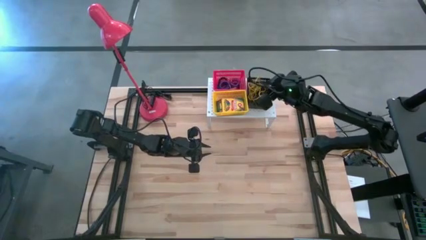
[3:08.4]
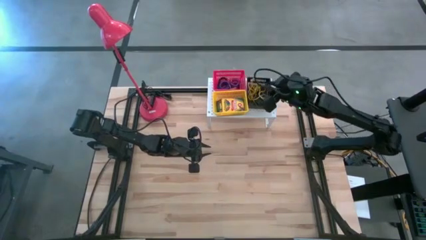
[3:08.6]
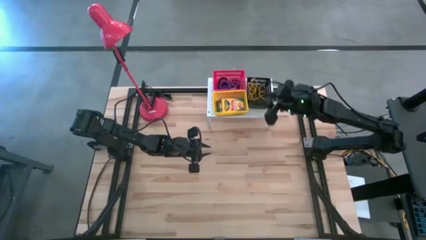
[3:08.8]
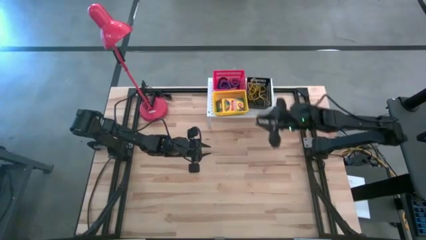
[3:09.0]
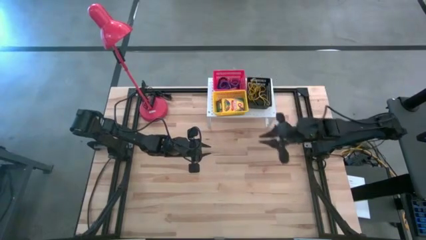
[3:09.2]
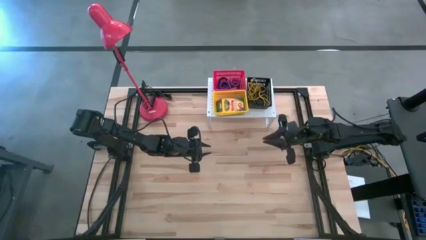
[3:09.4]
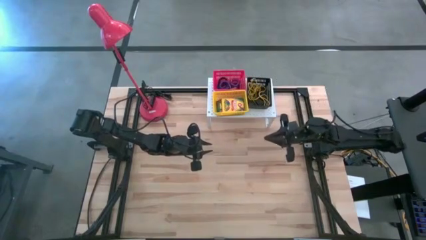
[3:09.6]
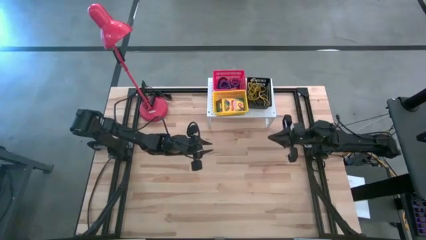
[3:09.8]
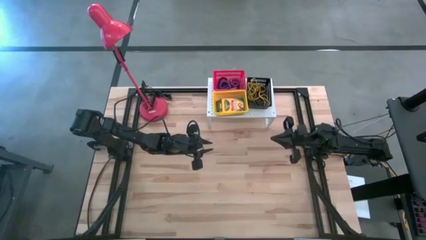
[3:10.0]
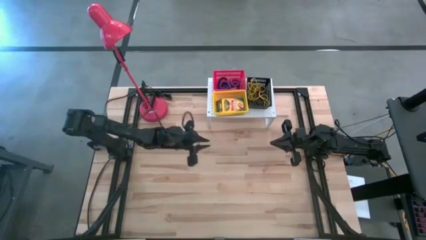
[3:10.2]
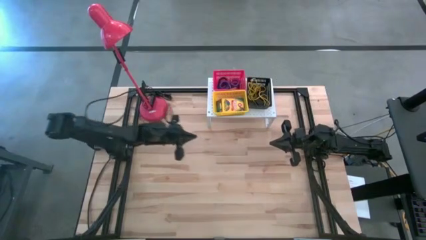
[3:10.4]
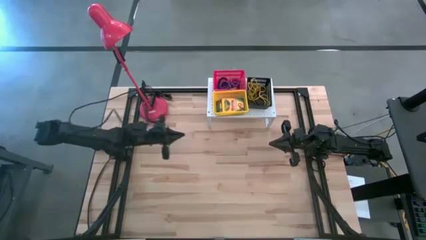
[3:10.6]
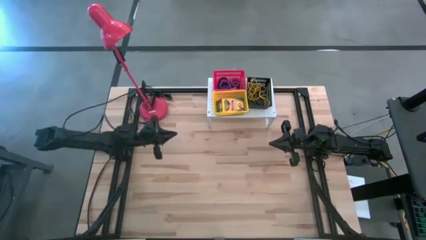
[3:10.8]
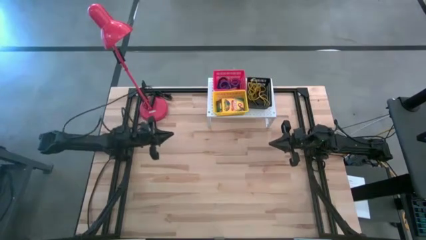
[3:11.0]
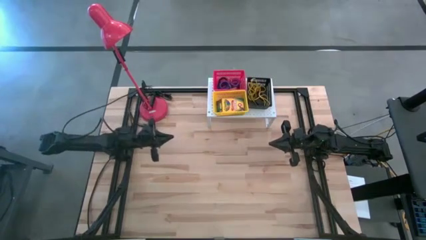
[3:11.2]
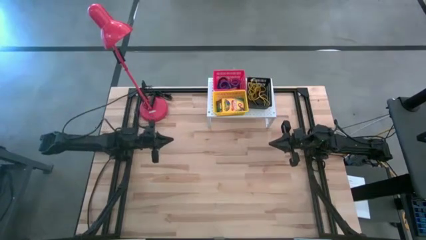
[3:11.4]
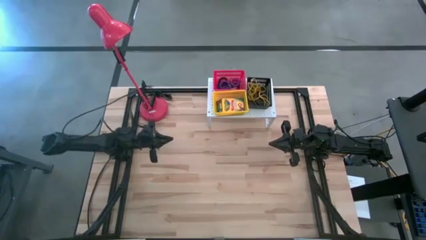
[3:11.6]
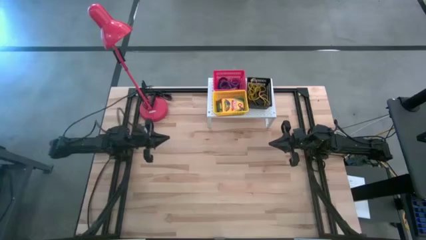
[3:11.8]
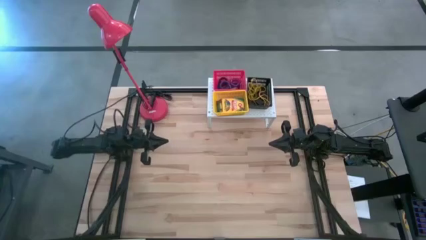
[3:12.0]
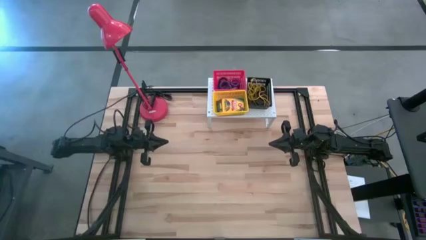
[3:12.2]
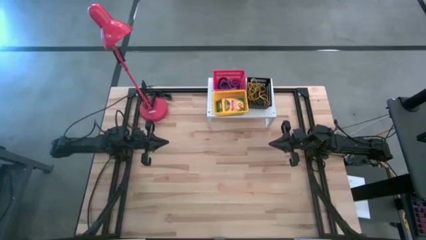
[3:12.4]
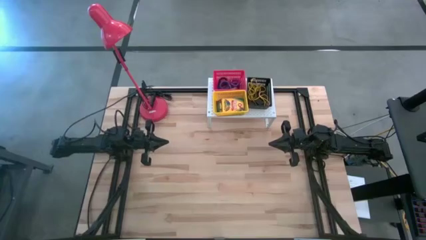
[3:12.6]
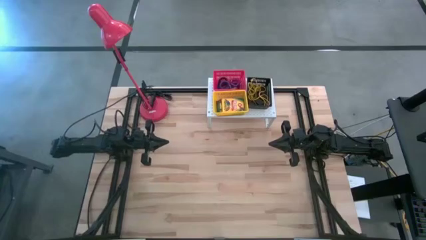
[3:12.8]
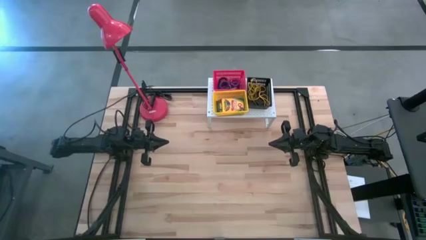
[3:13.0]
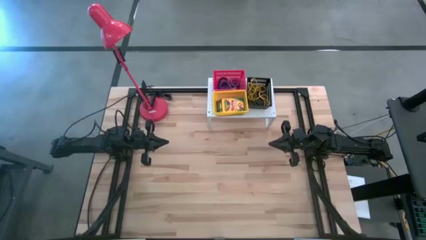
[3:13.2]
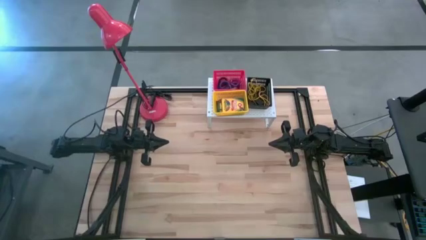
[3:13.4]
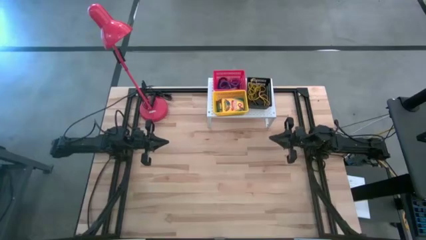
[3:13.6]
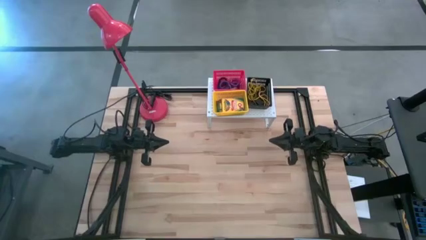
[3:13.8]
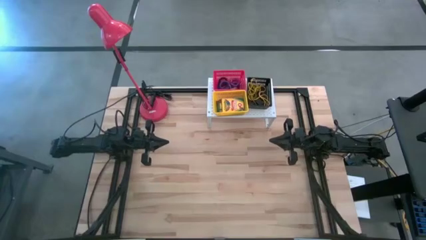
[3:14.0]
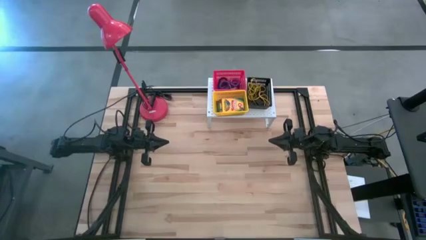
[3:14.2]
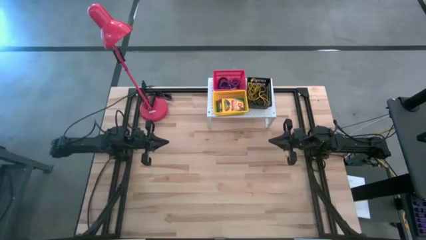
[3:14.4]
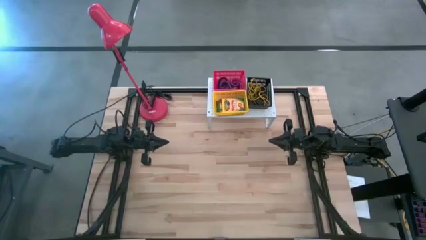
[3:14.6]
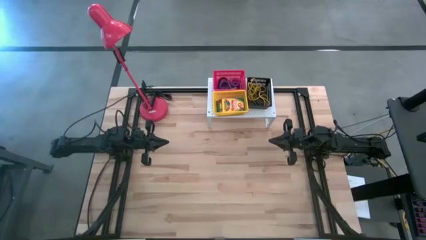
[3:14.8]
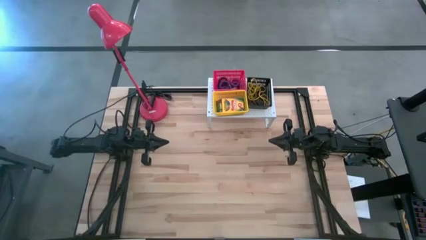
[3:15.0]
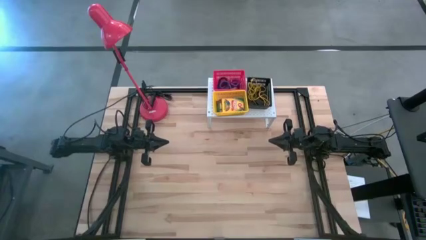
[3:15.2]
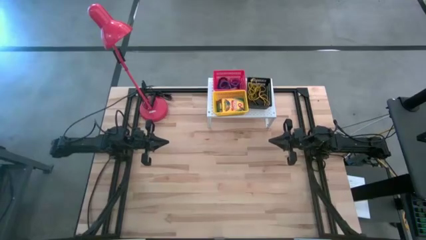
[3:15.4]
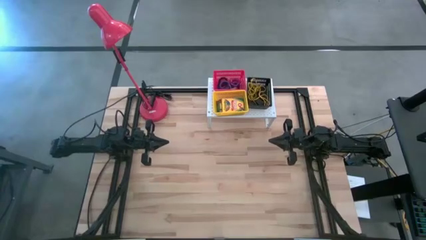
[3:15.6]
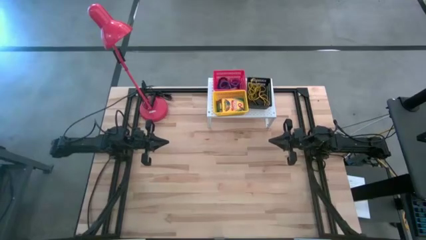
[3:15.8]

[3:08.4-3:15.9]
Task: Pick & Place Office Desk Supplies
Return to Home Position

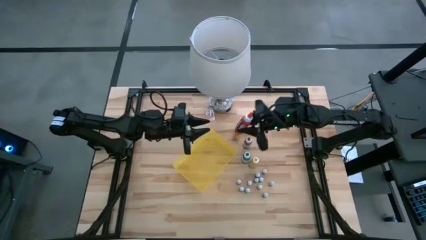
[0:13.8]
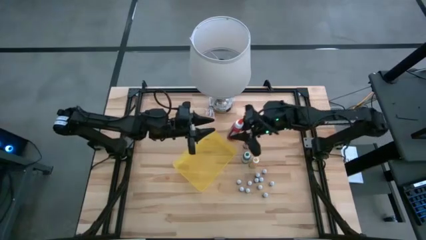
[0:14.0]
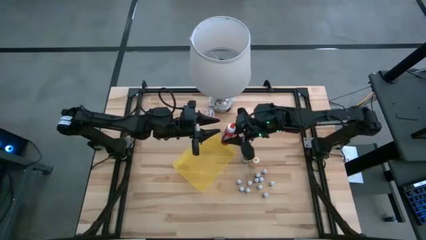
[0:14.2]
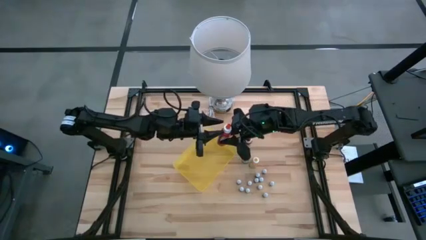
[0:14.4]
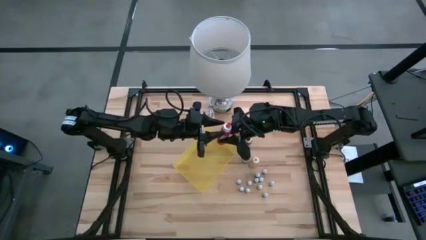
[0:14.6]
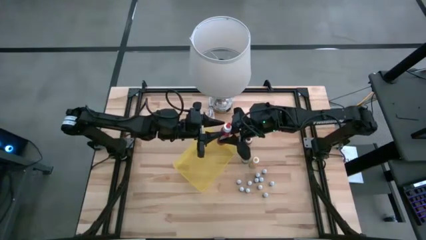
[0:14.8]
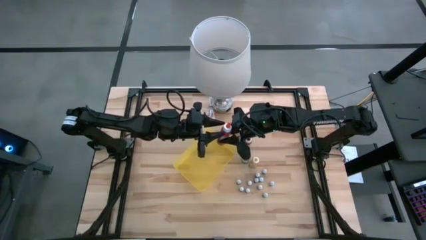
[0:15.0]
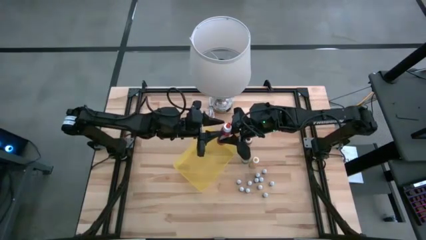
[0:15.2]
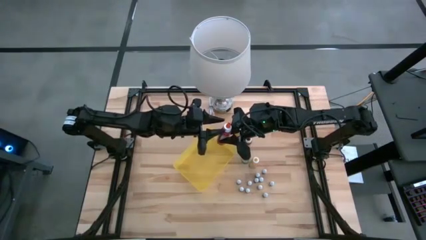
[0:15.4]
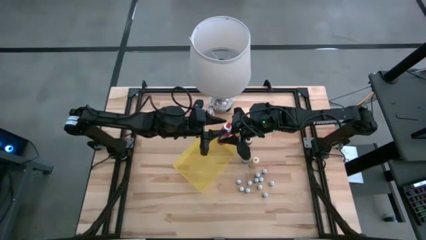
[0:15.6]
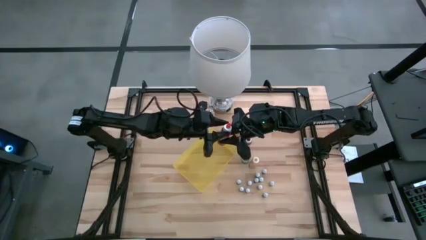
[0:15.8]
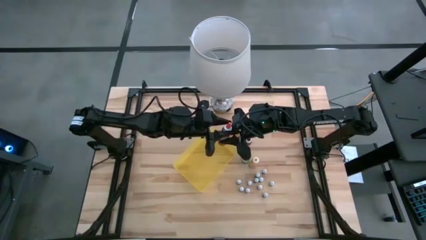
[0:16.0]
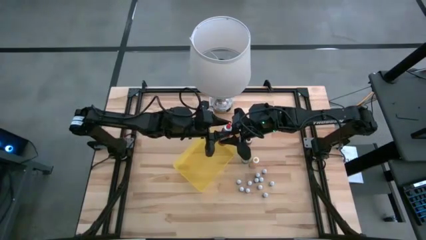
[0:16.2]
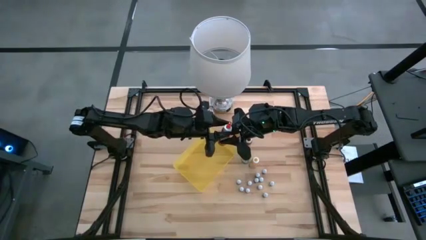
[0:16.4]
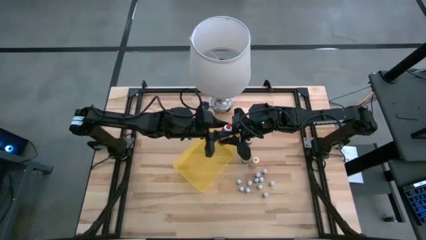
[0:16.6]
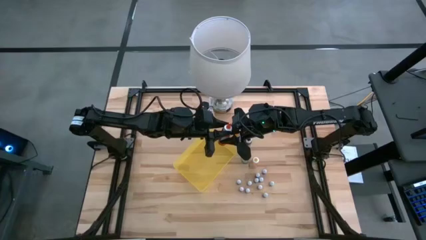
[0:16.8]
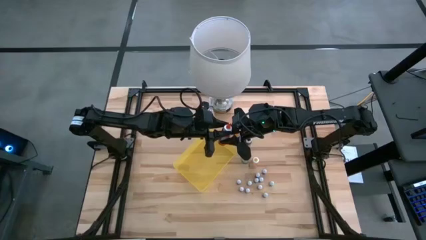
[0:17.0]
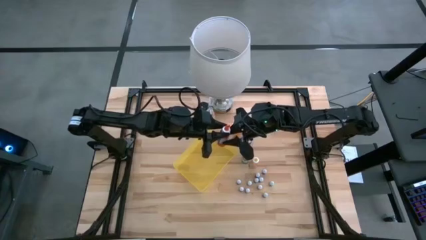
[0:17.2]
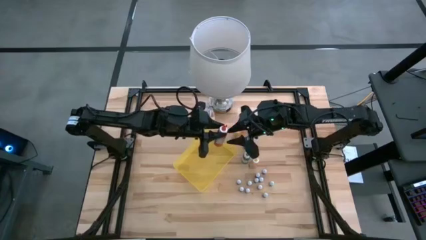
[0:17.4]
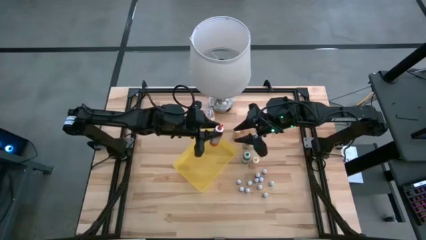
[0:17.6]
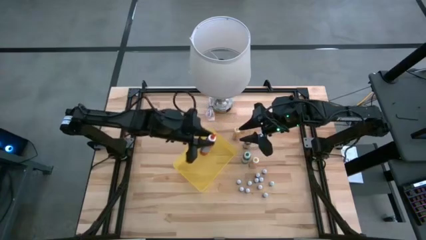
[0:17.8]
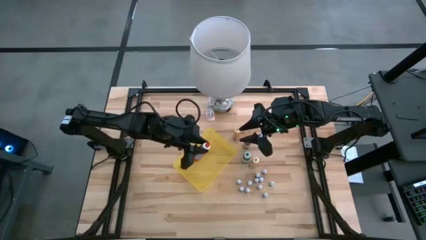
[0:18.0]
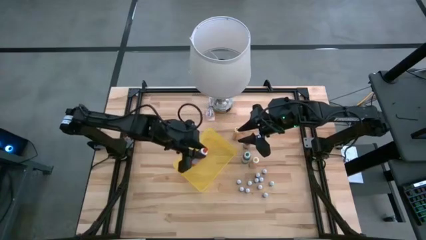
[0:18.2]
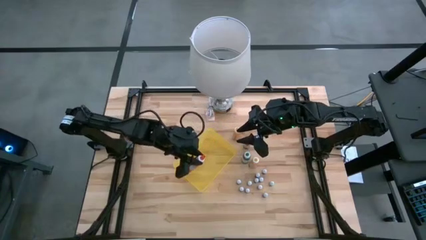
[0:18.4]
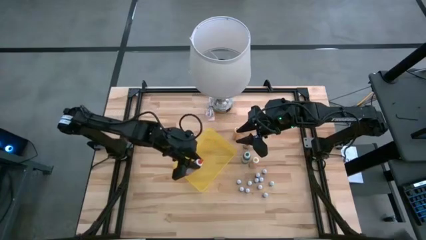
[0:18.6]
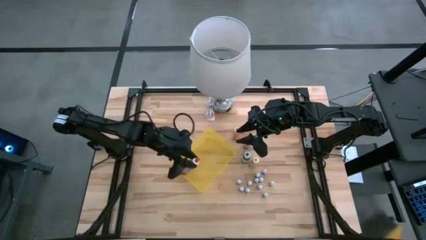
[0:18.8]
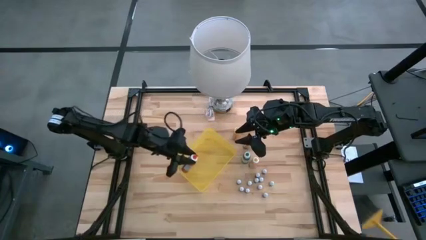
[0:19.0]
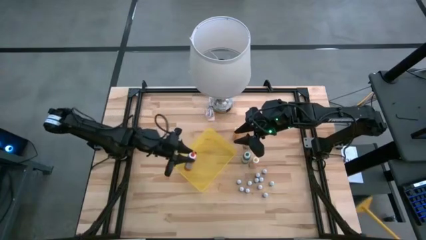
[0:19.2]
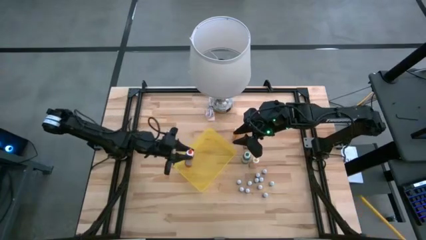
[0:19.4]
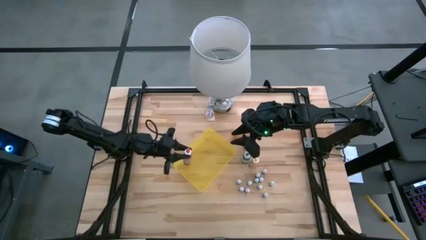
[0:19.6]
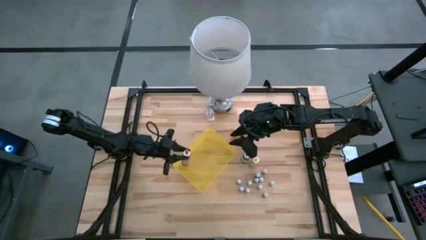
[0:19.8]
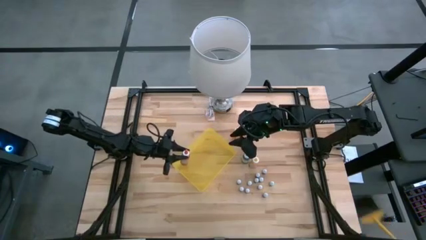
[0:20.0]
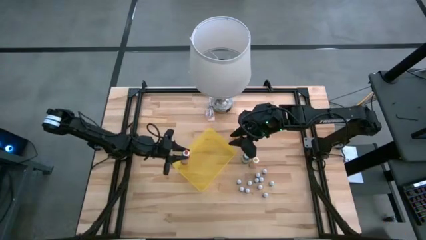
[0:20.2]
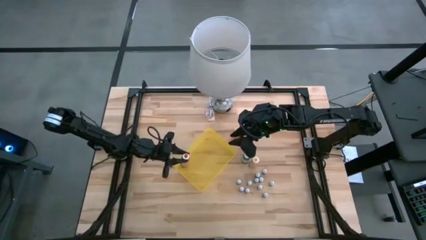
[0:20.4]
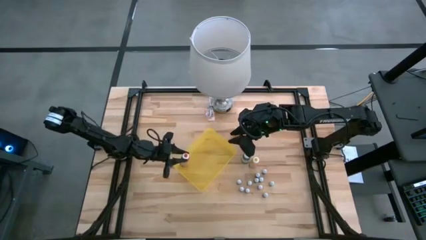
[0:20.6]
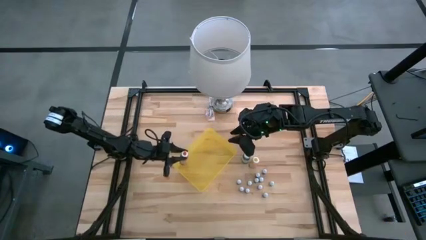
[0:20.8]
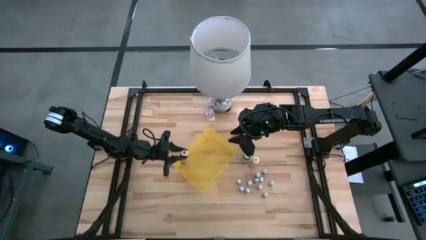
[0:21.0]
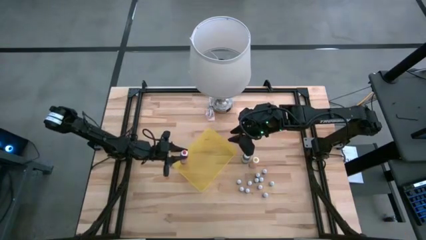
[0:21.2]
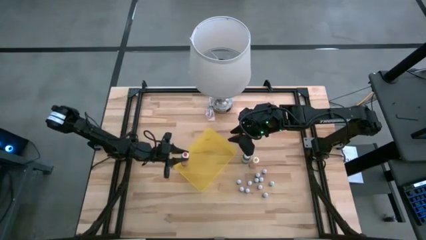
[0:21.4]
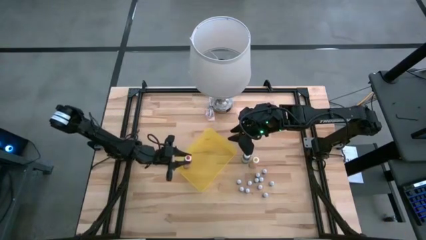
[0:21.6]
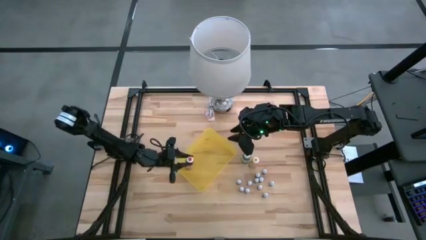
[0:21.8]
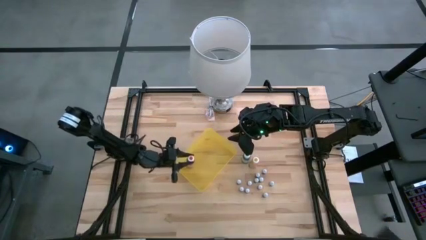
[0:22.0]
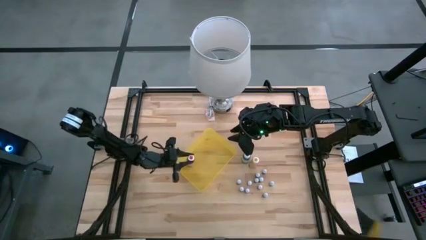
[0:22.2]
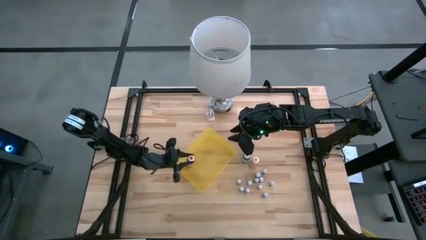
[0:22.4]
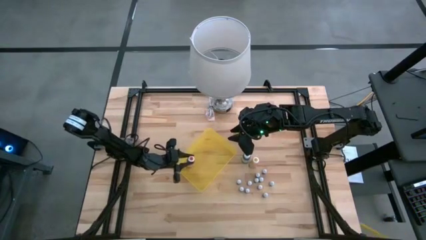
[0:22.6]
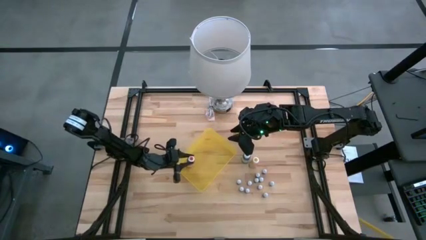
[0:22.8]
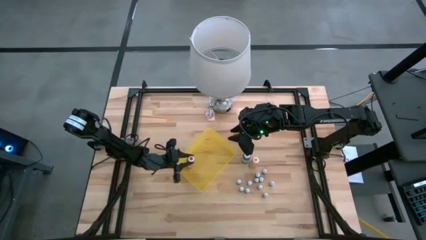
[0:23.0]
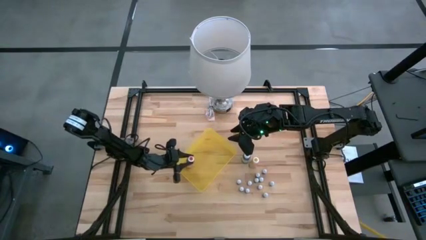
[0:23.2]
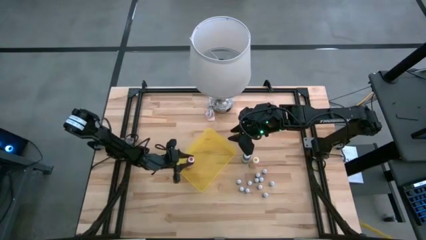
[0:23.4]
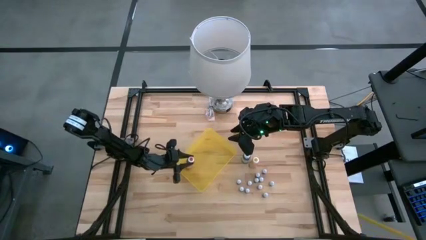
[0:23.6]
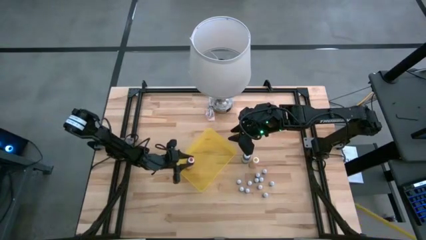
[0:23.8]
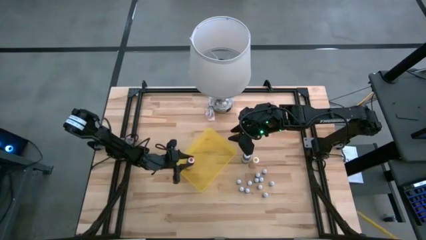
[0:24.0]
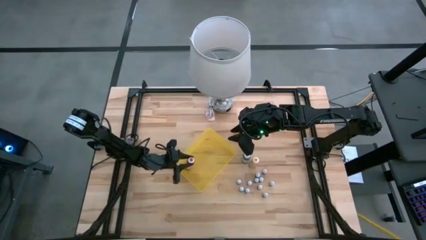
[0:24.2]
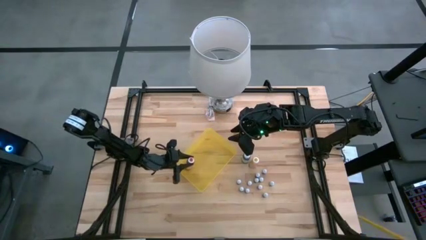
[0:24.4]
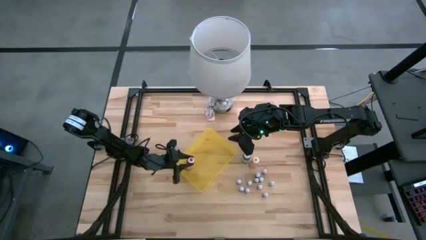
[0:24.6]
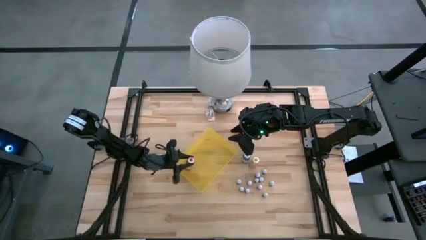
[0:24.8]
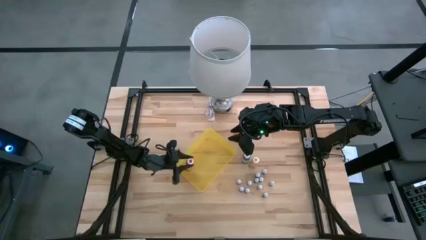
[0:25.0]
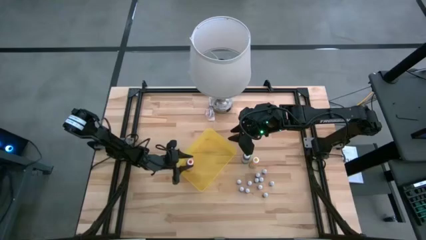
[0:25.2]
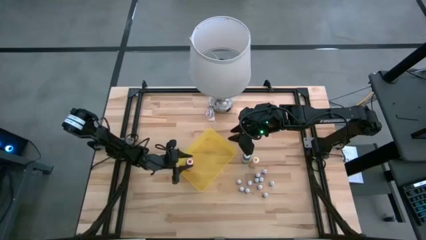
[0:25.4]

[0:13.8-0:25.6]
Task: Pick & Place food coloring
Put the large orange food coloring bottle into the yellow bin
